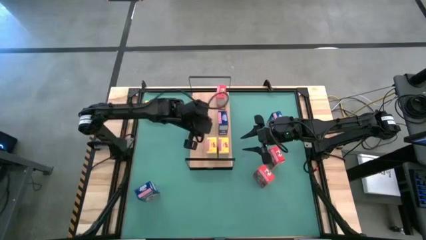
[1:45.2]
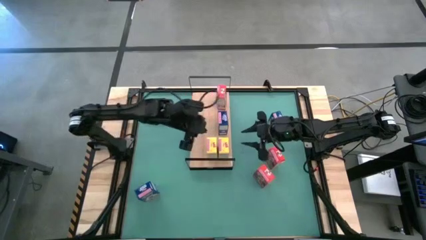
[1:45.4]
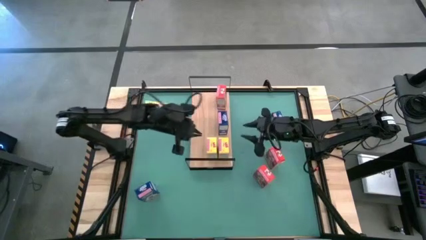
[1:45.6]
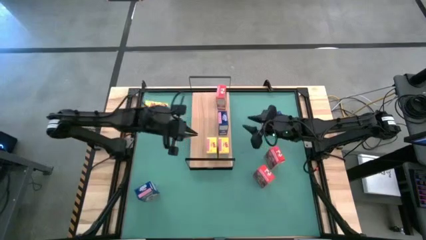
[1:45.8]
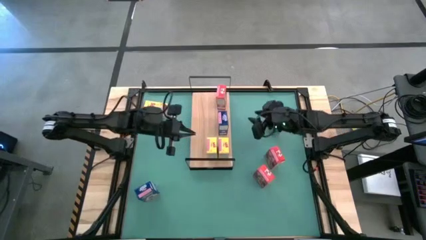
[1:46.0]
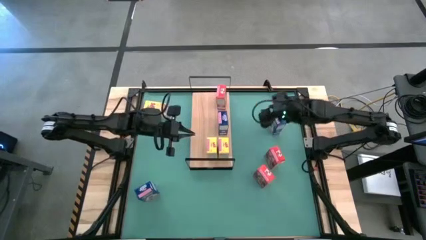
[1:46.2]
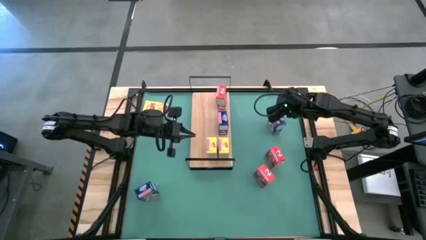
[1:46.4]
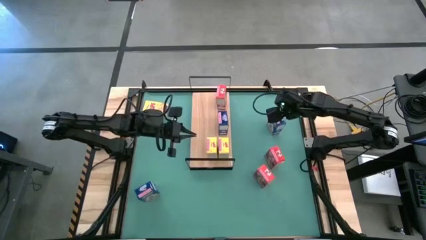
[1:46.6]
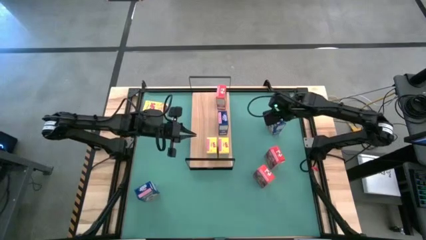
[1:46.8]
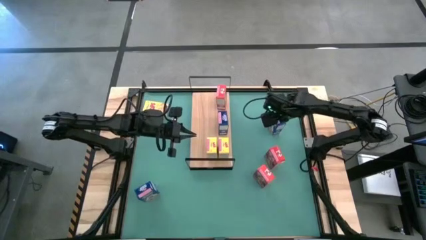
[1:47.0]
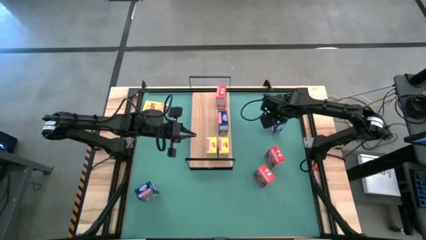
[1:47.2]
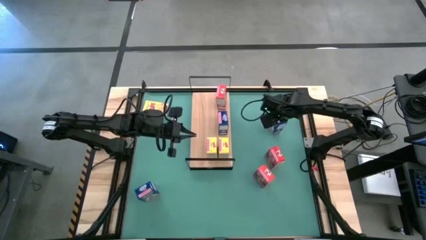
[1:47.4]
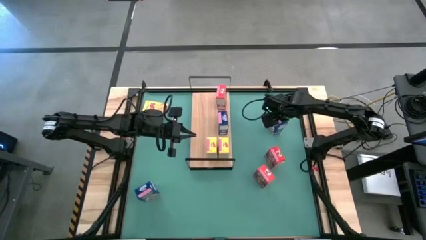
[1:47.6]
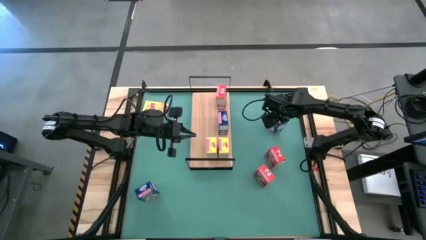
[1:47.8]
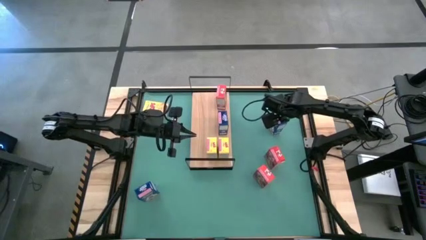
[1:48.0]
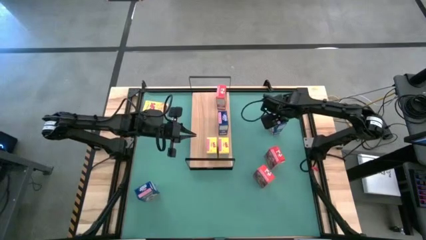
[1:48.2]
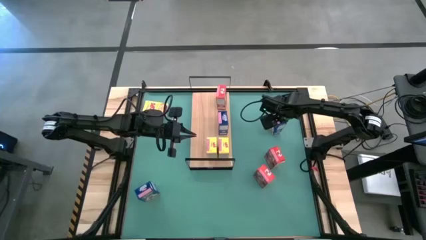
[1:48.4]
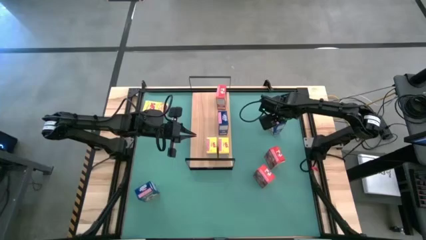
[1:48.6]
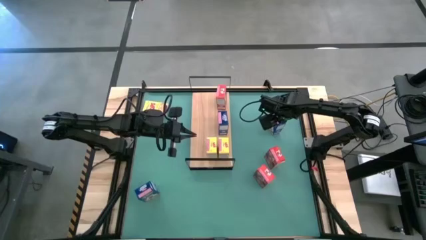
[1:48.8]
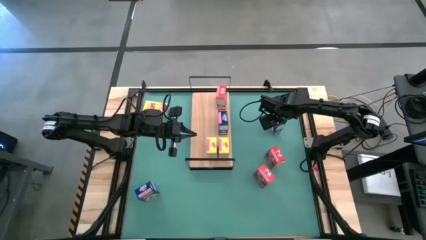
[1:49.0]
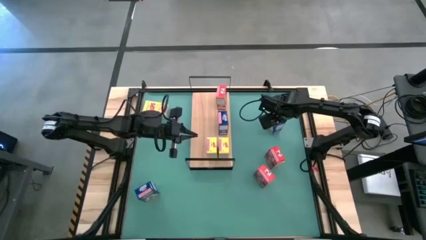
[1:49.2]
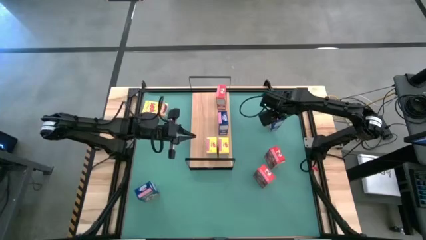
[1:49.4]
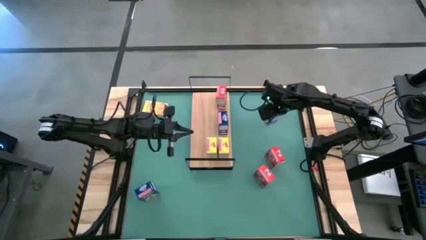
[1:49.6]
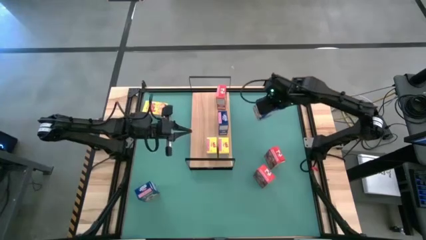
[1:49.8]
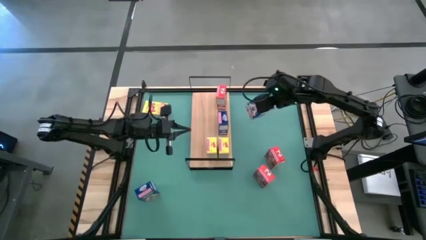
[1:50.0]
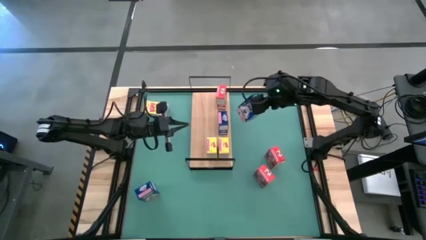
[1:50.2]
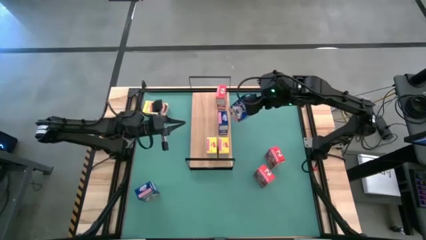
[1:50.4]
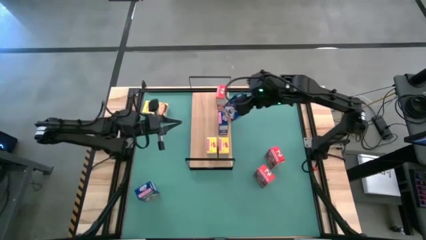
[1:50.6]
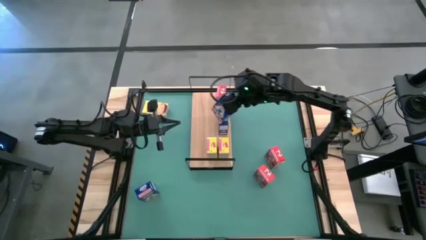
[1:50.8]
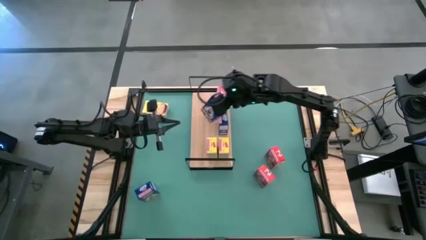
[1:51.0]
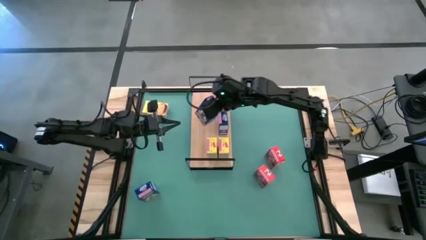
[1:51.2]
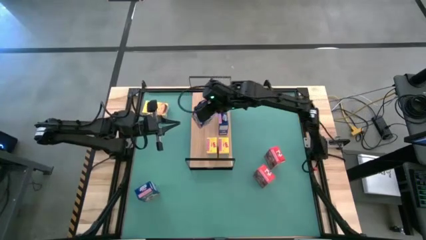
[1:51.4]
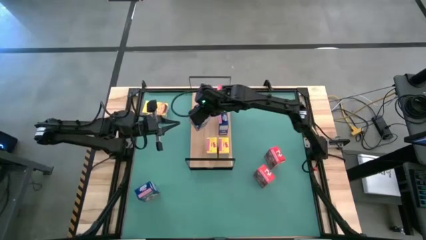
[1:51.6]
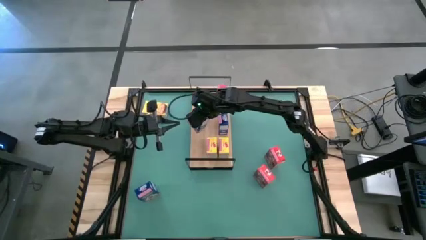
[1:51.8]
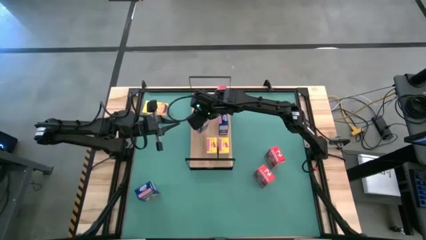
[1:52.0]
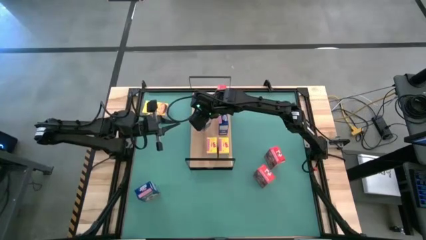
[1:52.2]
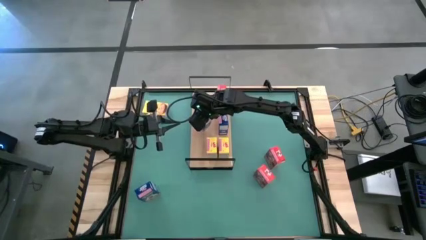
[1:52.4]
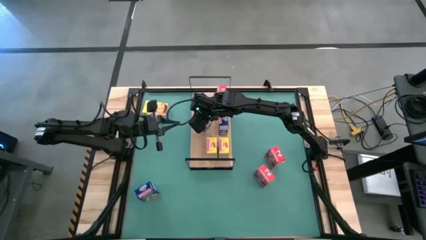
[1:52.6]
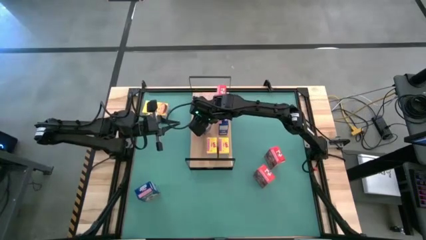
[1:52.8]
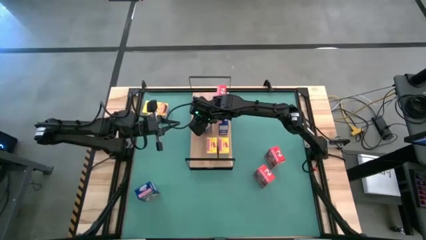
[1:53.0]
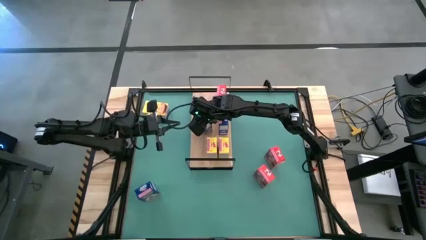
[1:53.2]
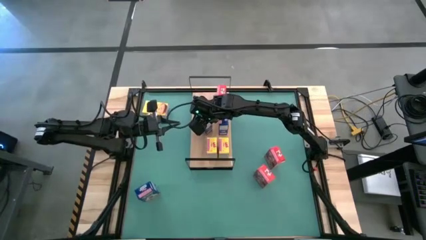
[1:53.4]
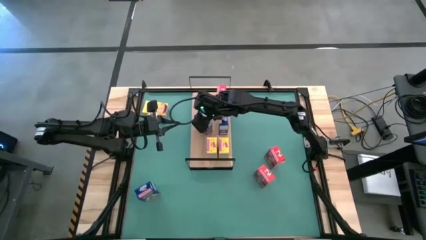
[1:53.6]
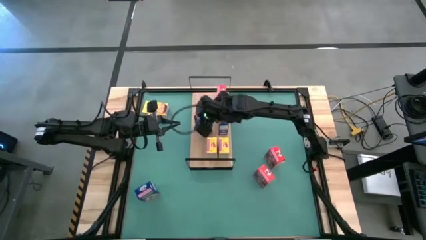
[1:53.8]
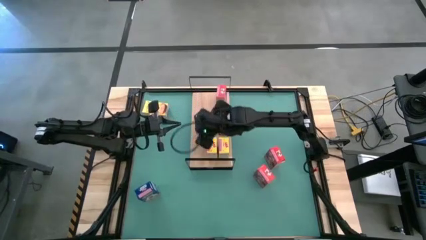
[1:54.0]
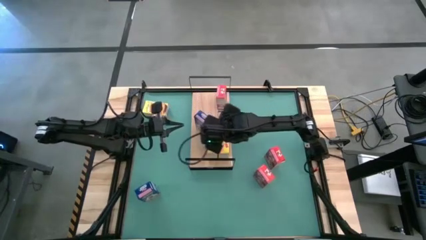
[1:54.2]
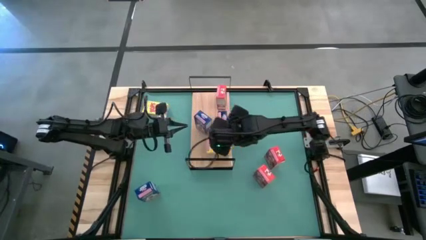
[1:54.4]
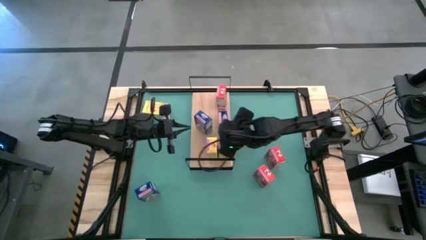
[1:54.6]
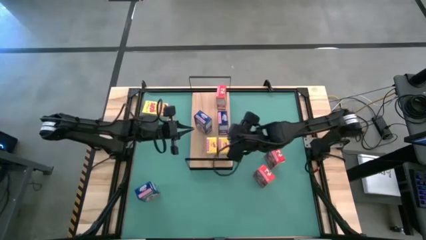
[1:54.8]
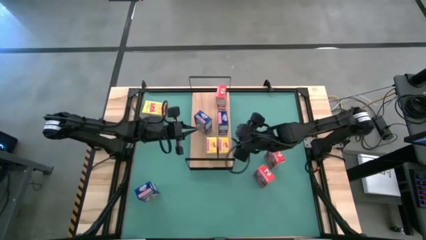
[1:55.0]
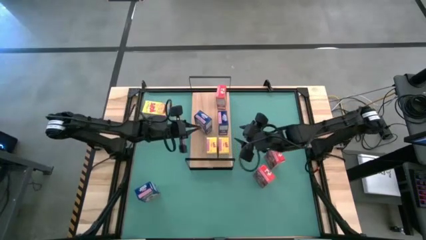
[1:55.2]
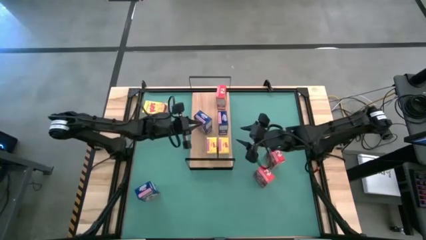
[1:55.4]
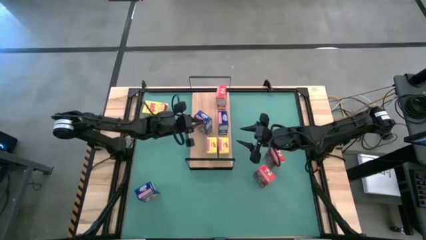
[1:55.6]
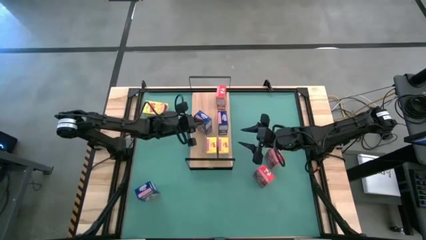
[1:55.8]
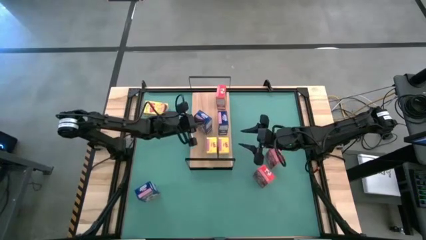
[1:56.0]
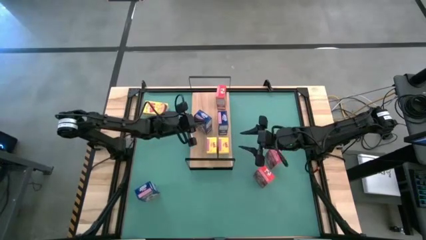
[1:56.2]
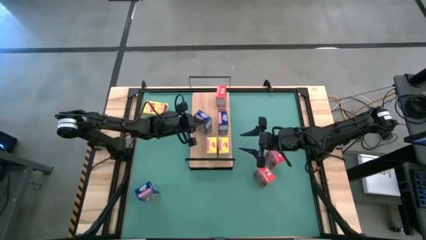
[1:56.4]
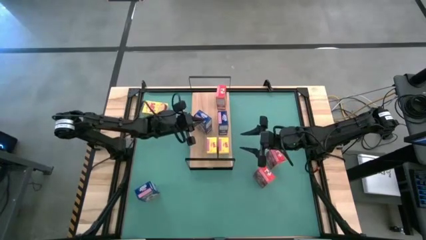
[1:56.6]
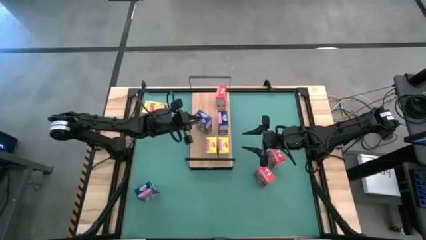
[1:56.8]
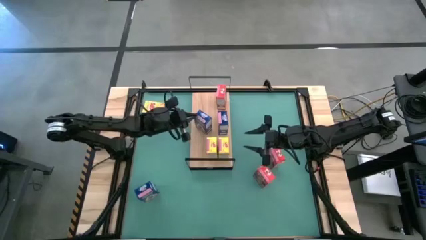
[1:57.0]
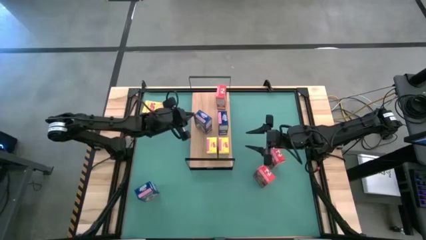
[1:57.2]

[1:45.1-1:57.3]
Task: Stack cereal on shelf
Put the top blue cereal box on the shelf aligned with the other blue cereal box

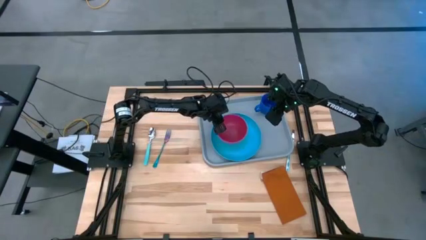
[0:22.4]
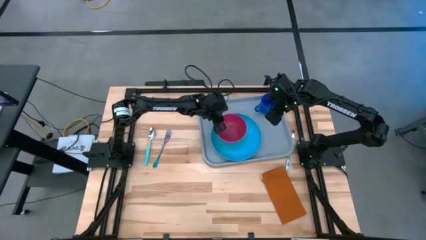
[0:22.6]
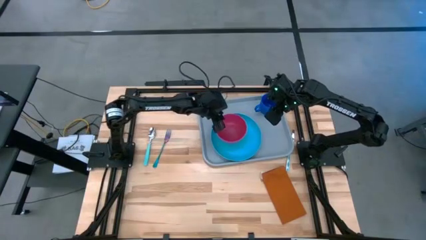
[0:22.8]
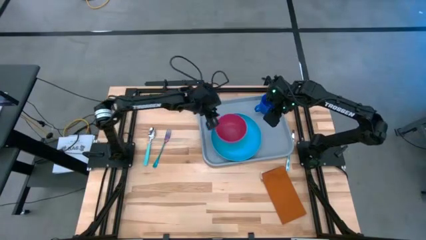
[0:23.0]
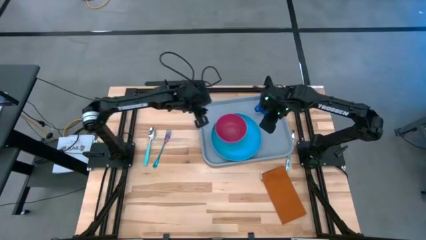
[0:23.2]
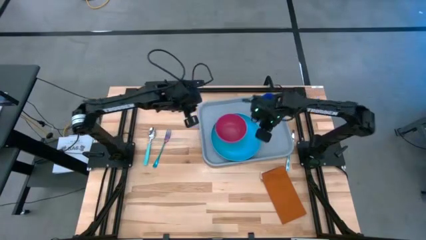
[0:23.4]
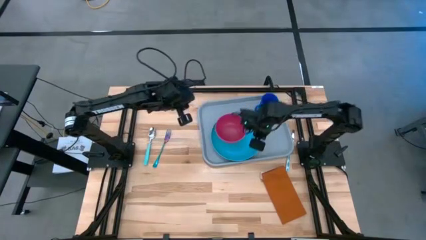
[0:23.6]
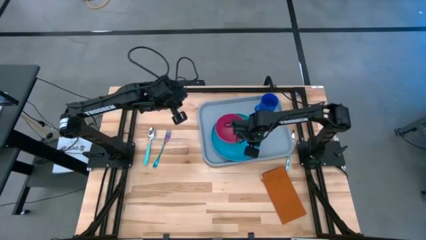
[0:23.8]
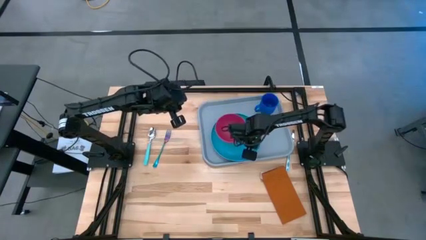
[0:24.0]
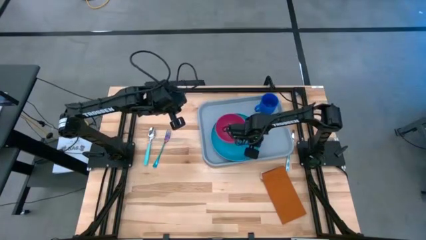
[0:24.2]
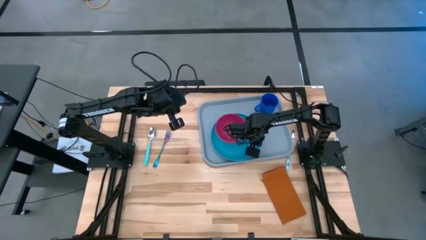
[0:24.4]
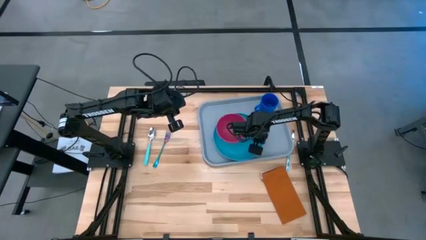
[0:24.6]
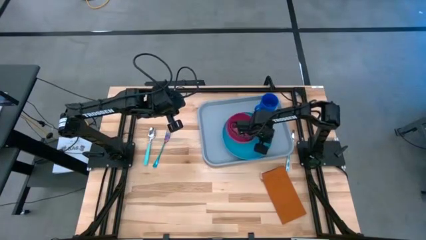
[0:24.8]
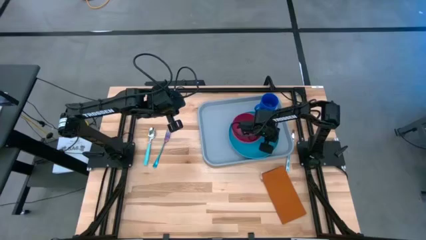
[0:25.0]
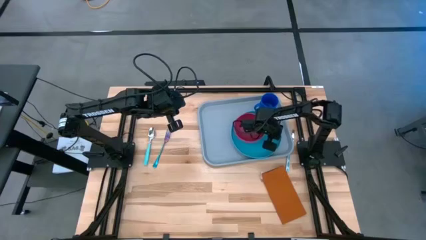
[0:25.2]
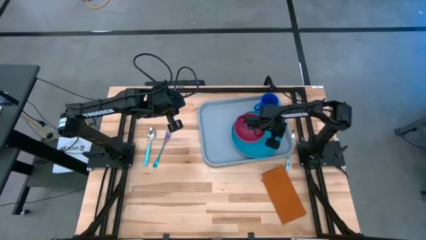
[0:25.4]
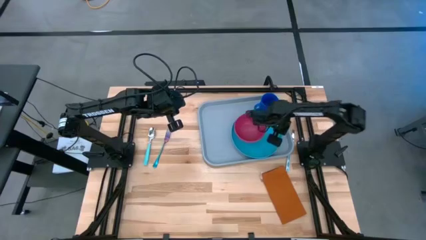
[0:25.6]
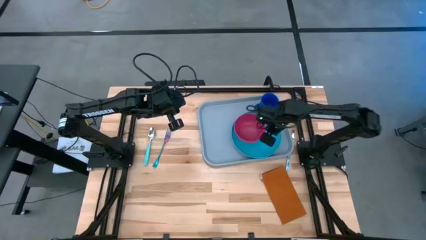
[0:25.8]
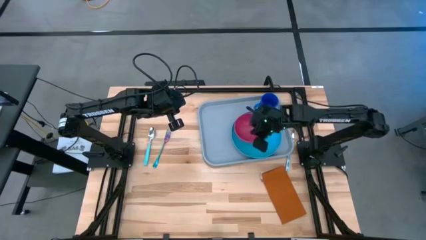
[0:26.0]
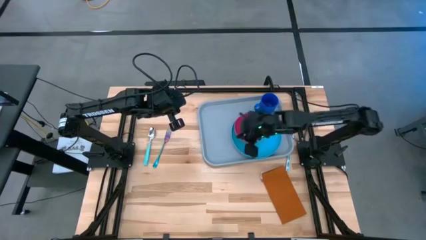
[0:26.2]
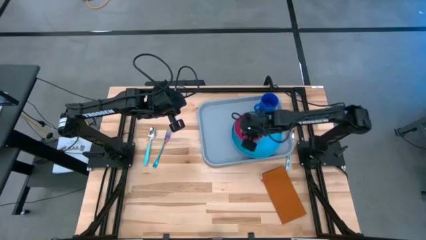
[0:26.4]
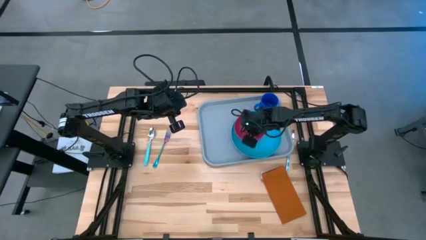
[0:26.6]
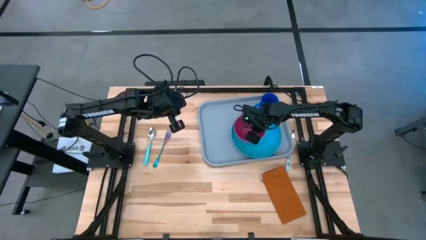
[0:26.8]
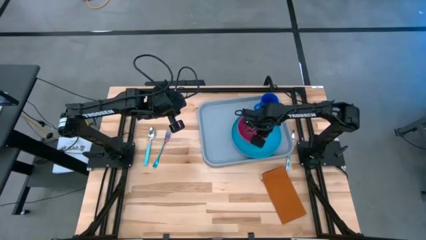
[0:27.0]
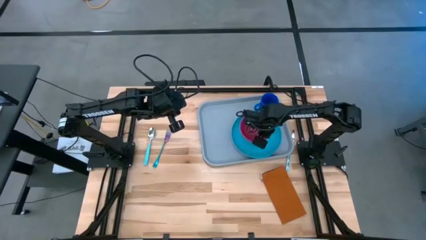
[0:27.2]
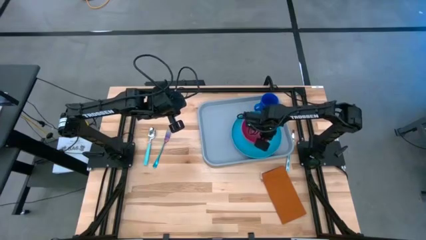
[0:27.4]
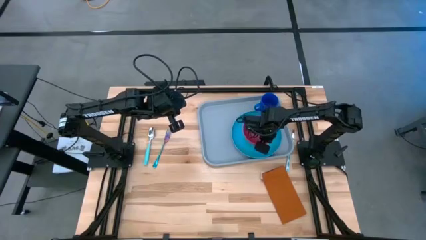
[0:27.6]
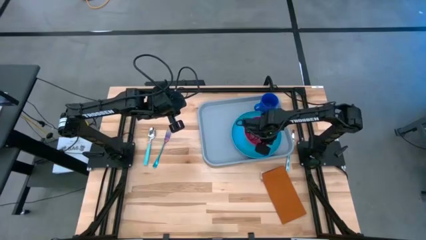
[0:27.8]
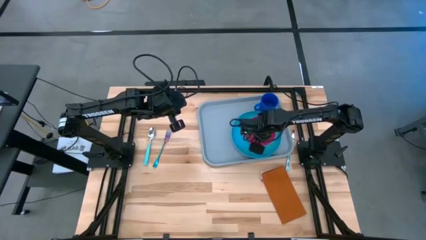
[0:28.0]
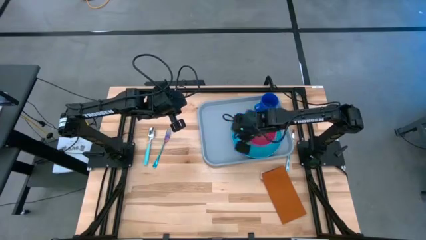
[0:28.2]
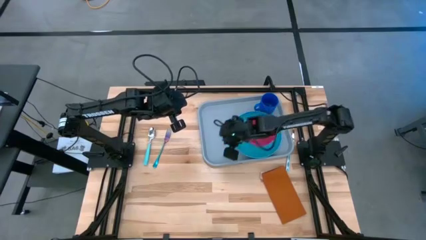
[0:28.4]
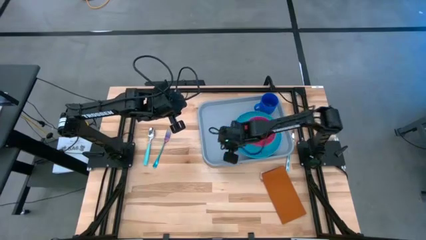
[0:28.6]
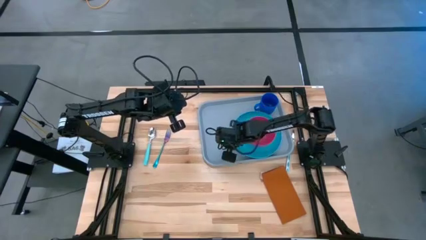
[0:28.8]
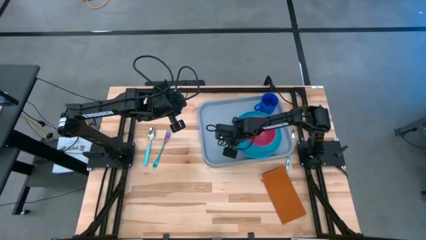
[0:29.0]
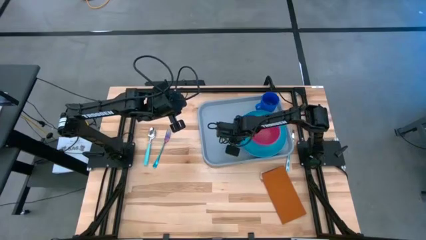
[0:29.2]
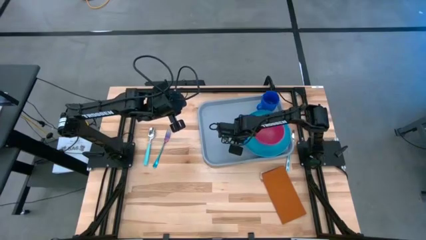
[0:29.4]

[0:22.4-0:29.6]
Task: Set up tray
Adjust the light blue plate
